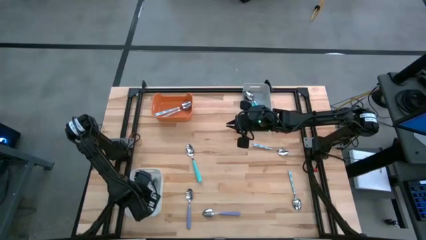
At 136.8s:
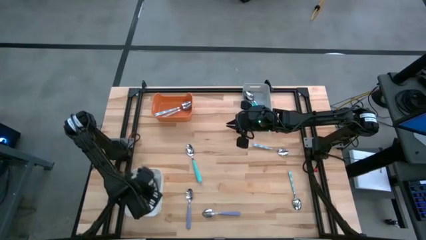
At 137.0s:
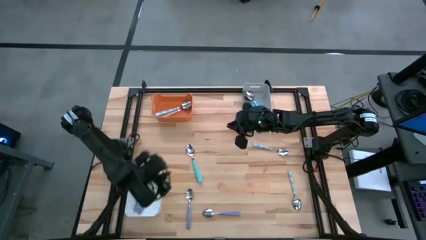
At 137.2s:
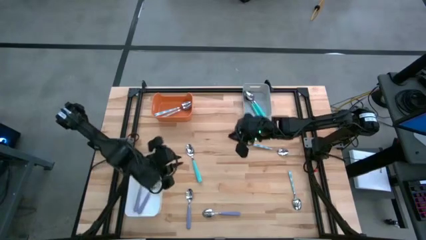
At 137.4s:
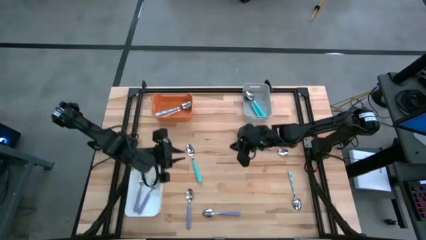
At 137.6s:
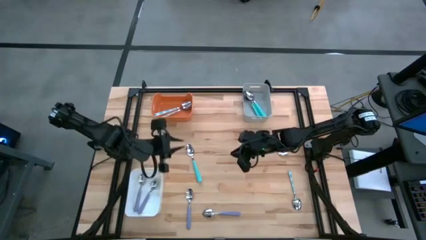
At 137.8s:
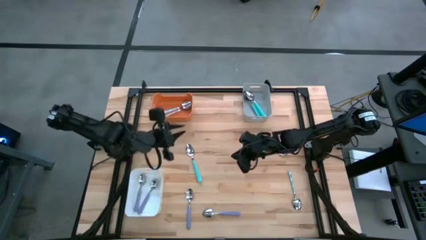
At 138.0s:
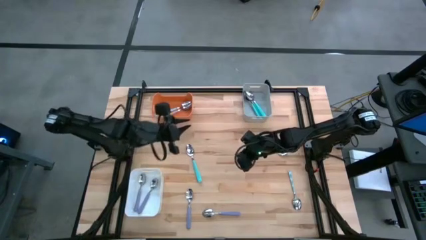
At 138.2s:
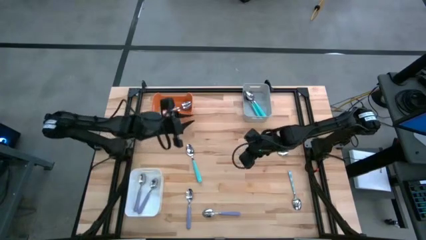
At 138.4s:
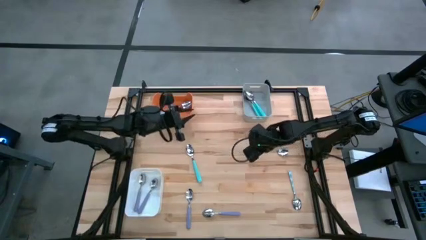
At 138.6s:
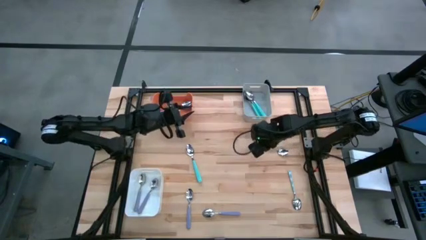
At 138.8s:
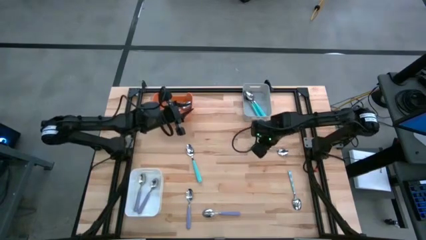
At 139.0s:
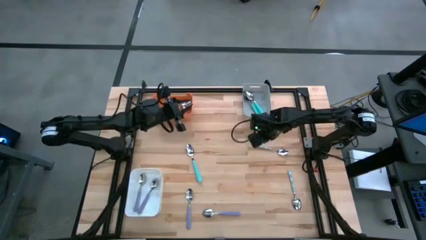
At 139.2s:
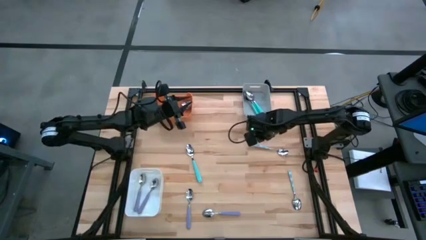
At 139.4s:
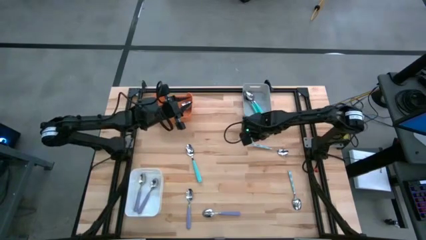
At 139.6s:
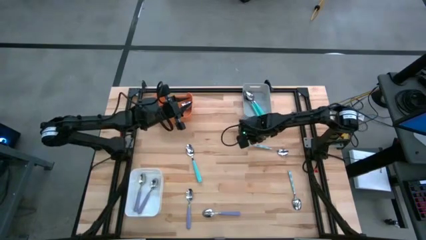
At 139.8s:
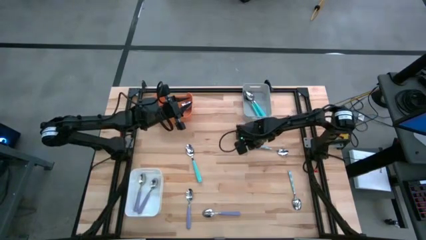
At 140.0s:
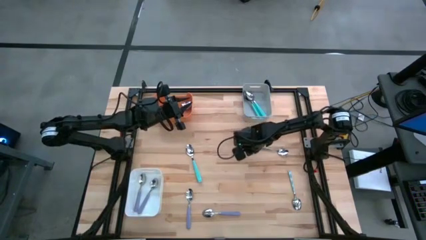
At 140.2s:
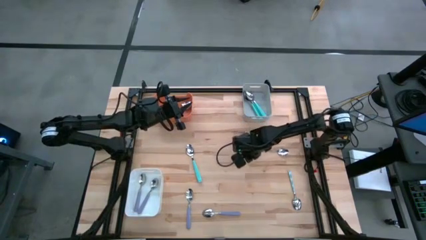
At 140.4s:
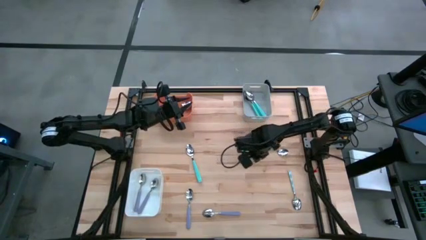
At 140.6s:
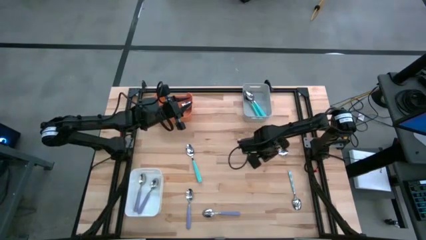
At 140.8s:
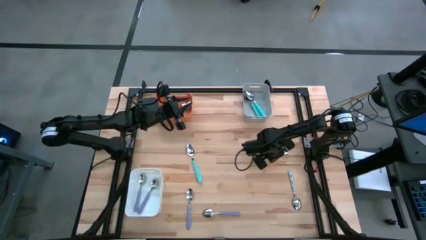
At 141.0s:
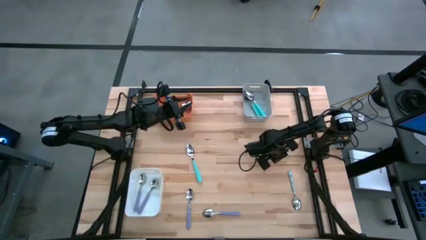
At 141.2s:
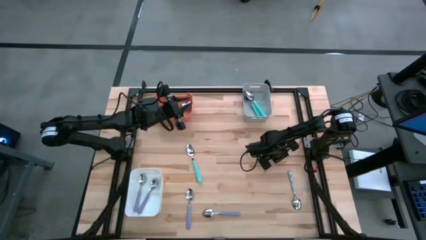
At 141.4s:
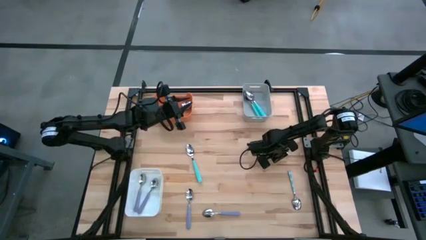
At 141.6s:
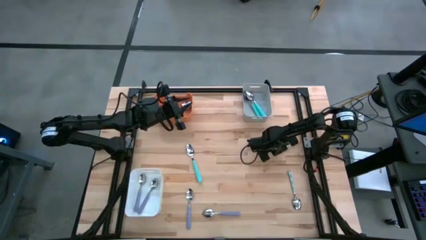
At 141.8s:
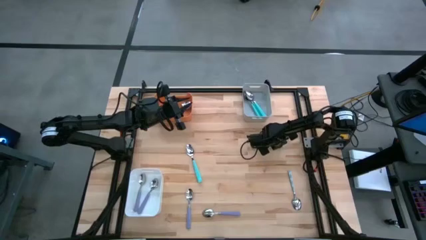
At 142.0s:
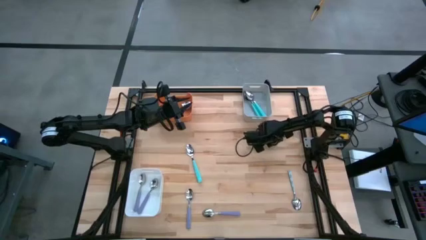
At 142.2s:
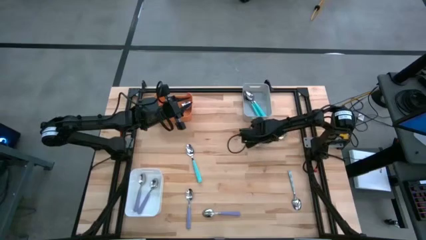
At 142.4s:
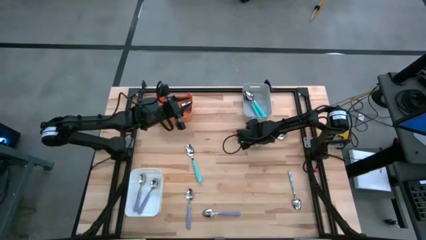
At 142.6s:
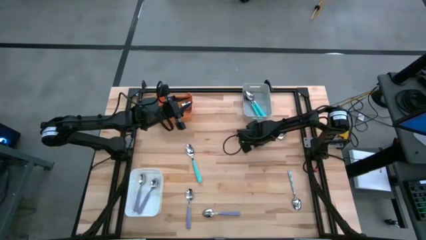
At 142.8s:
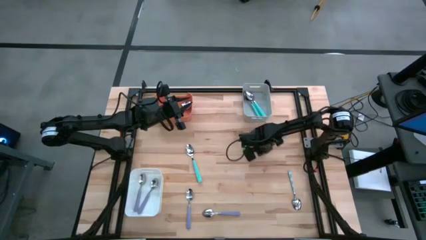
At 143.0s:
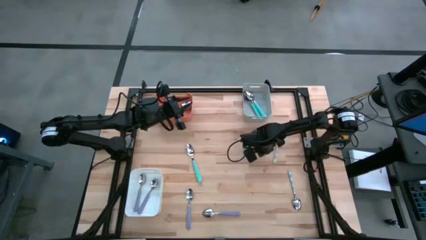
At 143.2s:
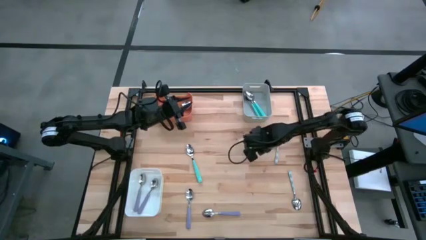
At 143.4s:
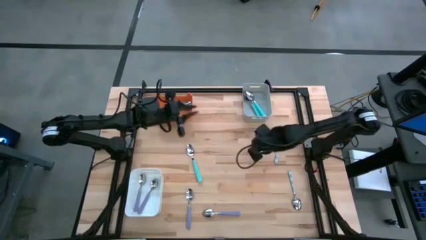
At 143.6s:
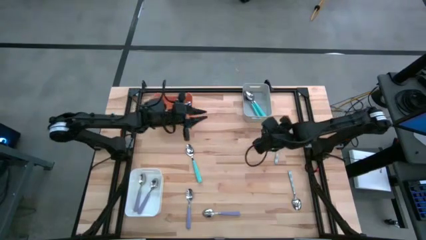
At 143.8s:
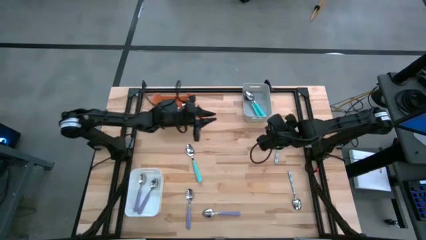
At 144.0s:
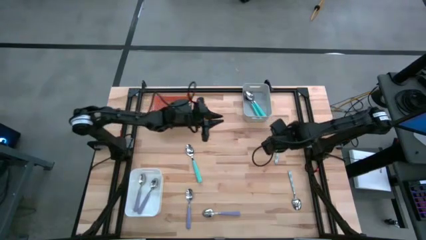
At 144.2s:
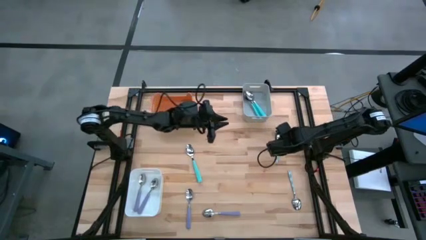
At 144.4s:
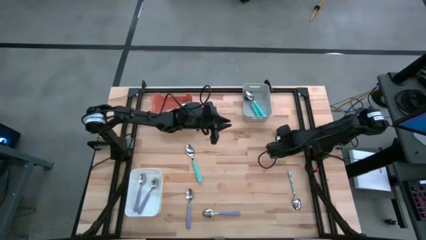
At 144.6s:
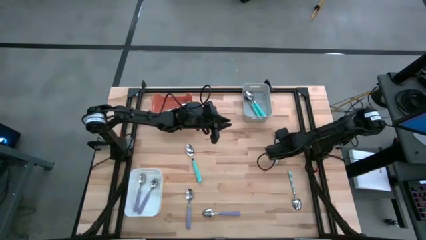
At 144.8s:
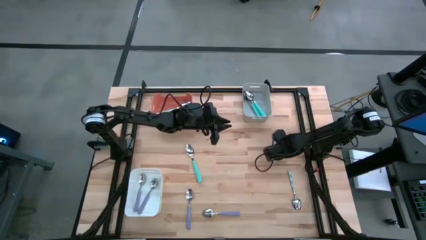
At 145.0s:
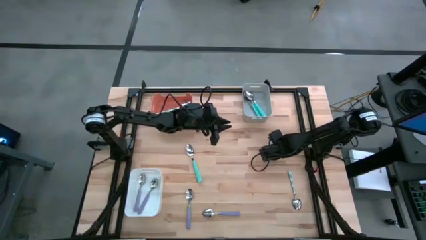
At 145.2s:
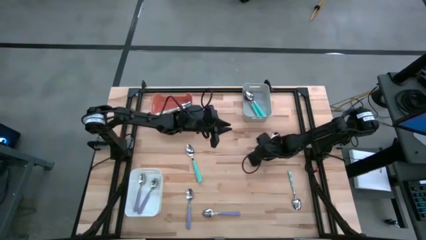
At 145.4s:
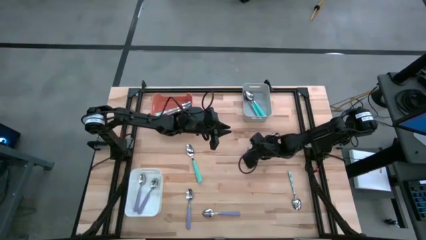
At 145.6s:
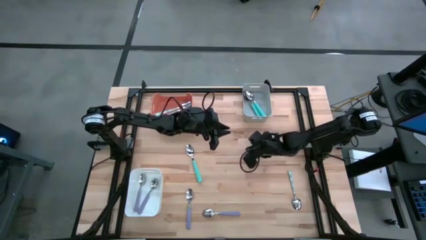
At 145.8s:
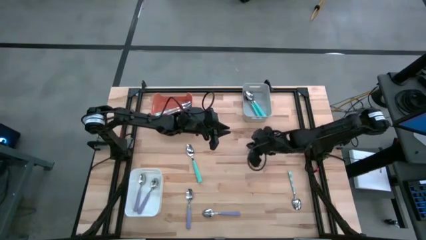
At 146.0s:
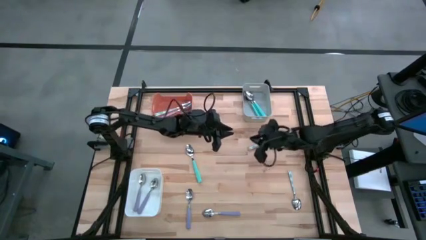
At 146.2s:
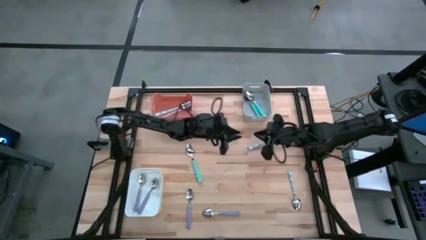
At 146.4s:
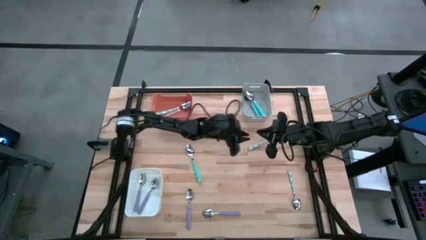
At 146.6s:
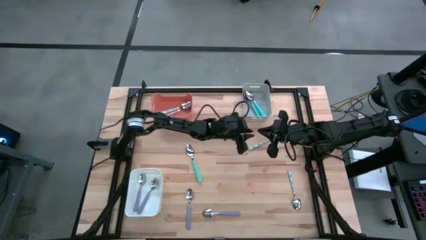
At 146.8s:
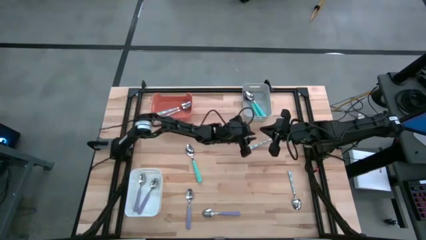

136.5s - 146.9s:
Task: Sort silverware by color (type)
Put the top blue patterned spoon into the orange bin

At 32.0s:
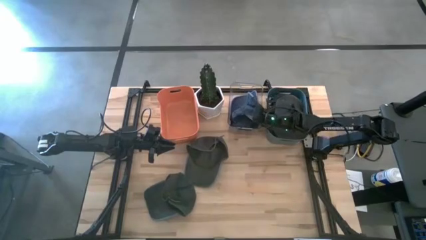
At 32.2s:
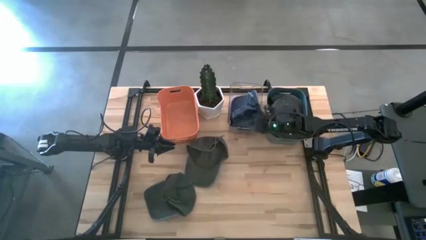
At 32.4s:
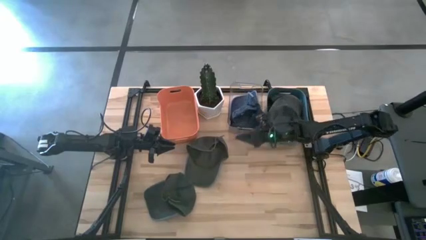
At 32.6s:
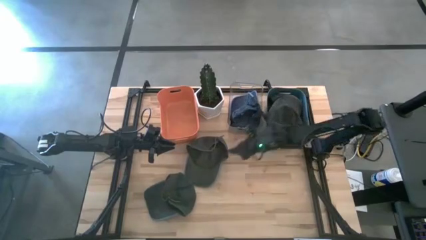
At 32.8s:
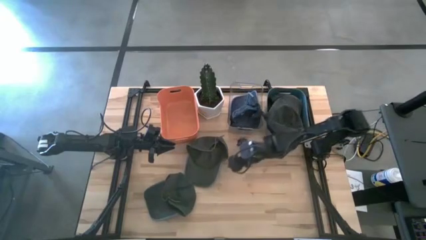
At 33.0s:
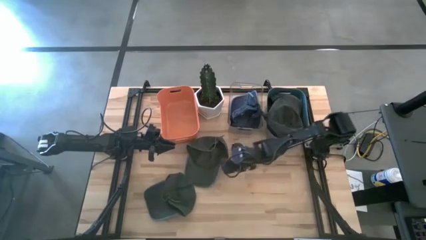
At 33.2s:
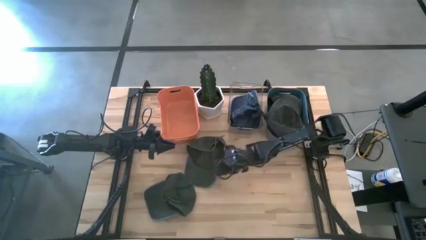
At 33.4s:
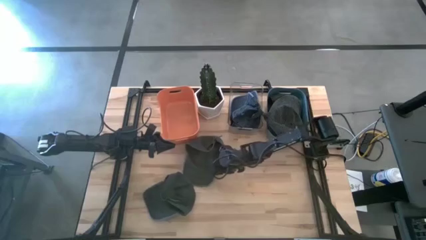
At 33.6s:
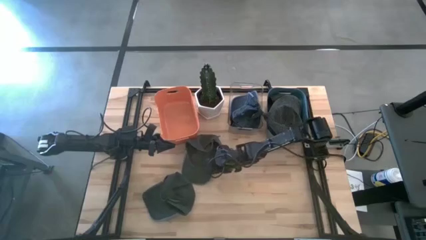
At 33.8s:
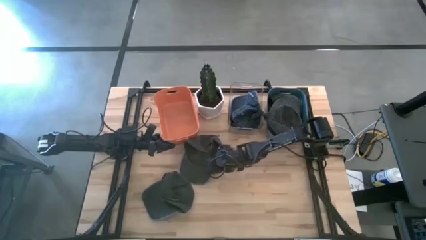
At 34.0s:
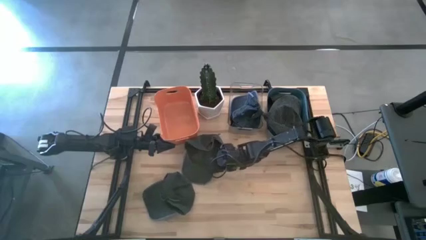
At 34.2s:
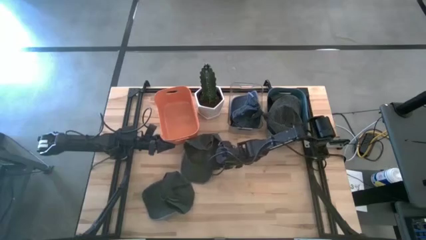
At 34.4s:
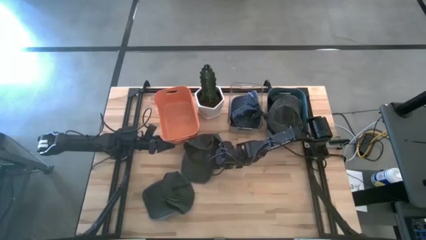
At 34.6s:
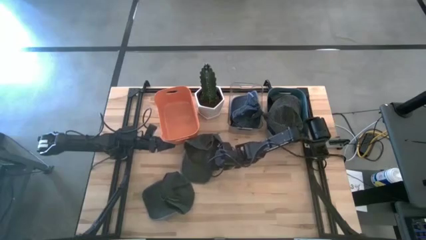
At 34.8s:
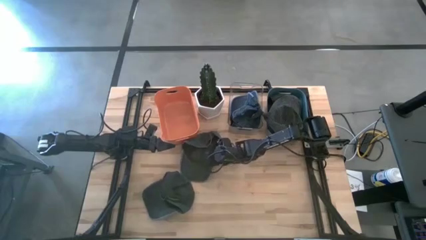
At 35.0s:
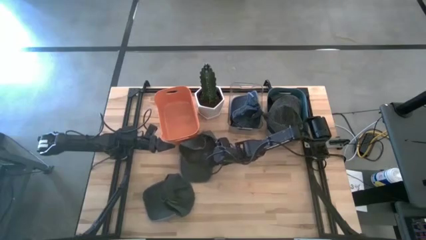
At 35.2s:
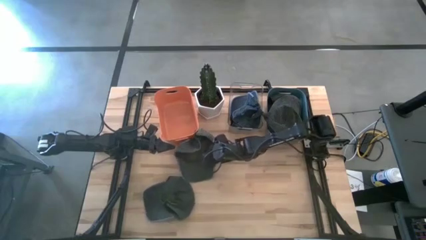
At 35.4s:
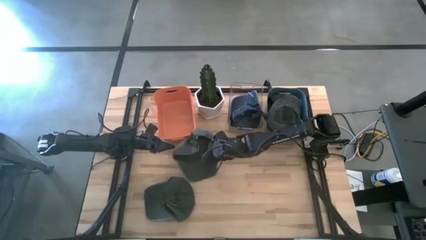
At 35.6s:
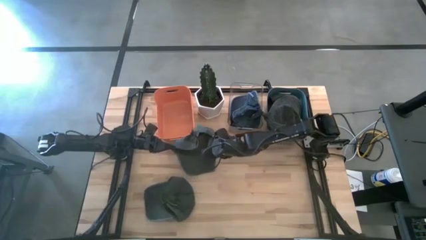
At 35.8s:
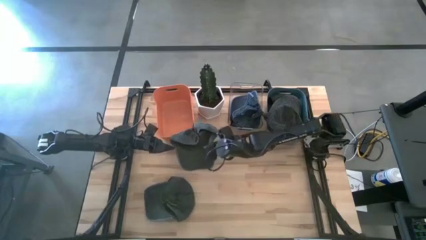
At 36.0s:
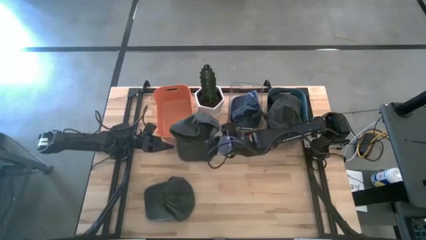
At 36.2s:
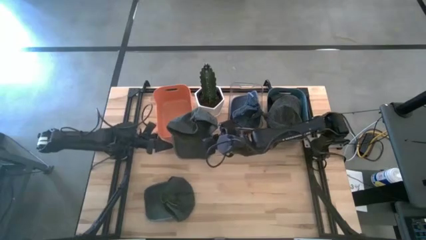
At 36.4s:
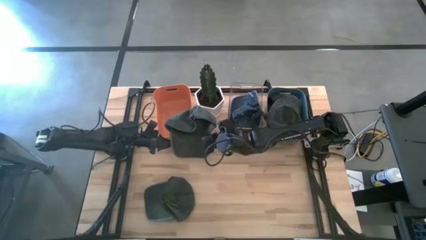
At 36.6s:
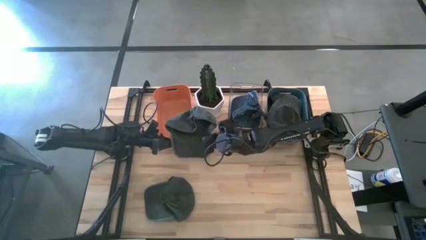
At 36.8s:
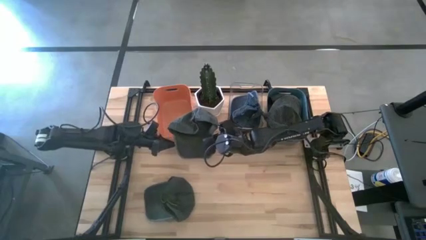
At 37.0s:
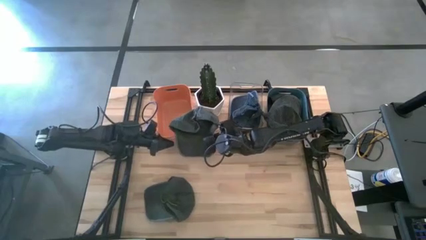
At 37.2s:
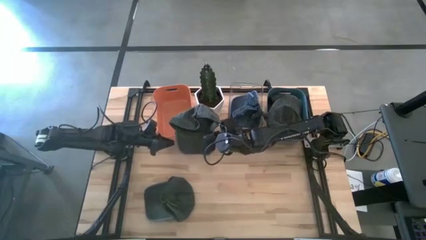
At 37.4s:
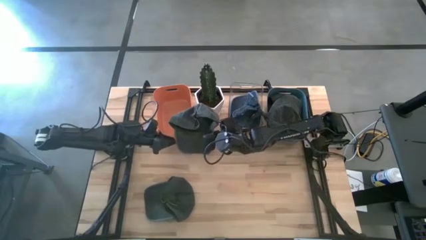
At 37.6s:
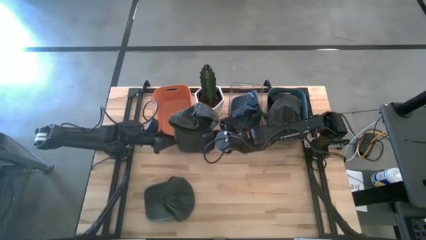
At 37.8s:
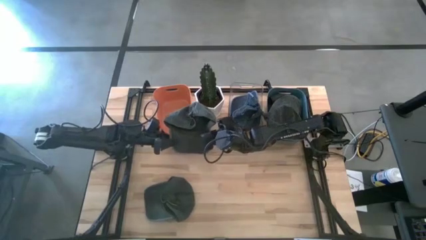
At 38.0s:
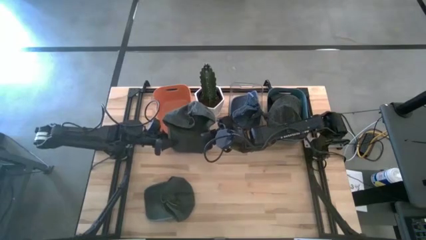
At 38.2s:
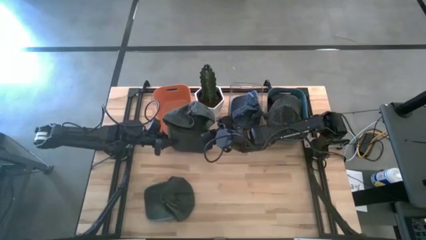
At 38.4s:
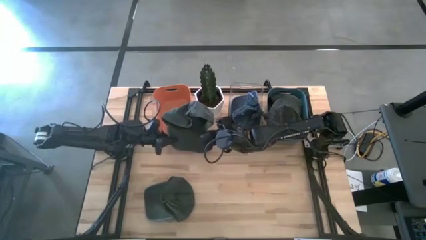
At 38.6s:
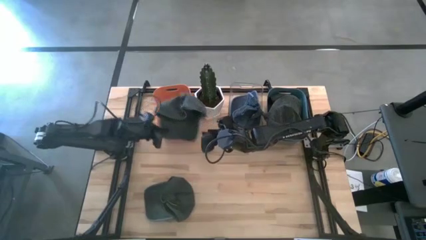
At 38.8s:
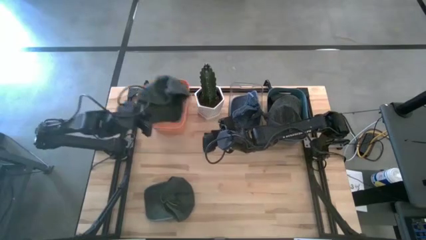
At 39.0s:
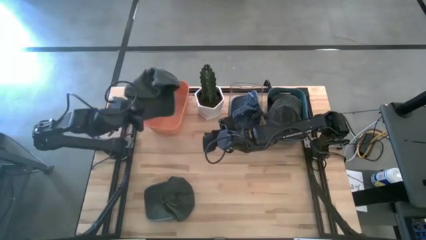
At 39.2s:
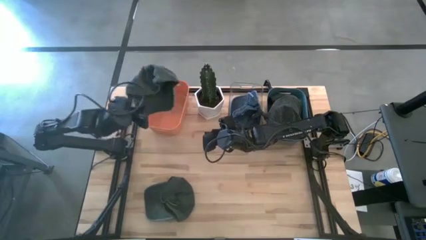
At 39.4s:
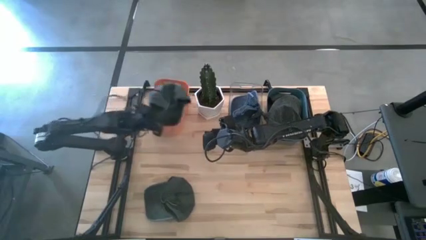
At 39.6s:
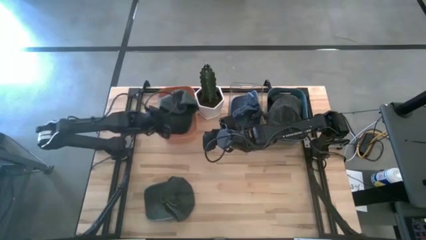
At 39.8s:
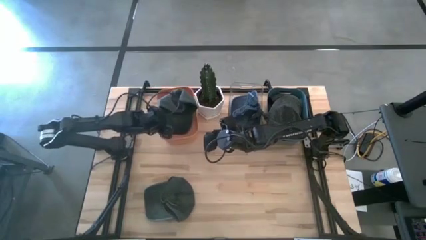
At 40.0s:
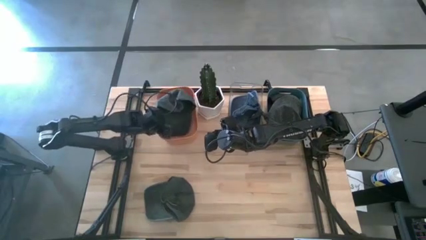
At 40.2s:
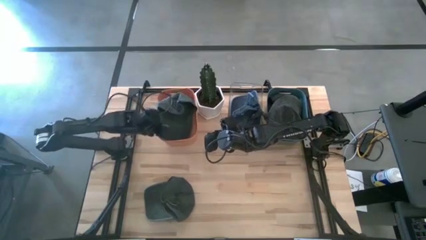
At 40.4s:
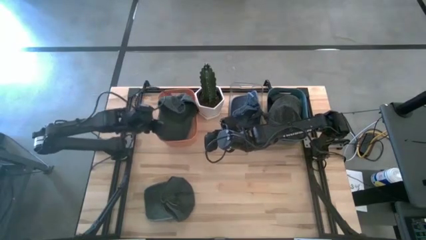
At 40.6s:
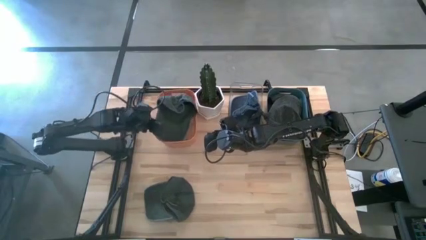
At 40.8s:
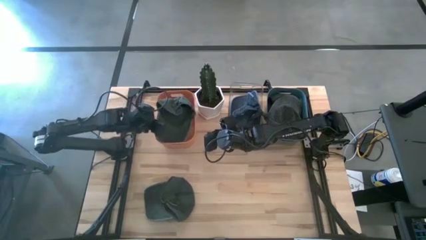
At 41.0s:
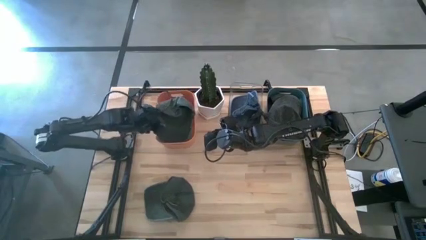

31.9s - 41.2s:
Task: Pick & Place hat
Put the top black cap into the orange bin
